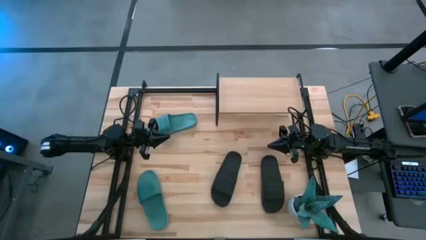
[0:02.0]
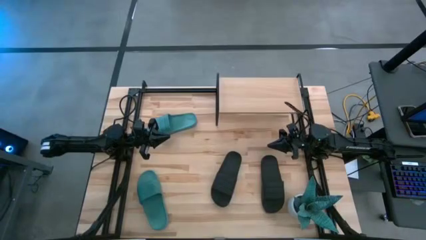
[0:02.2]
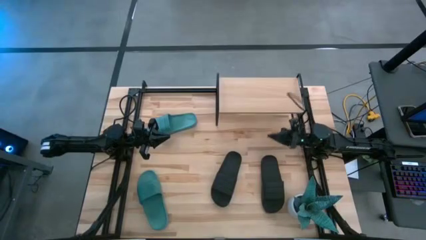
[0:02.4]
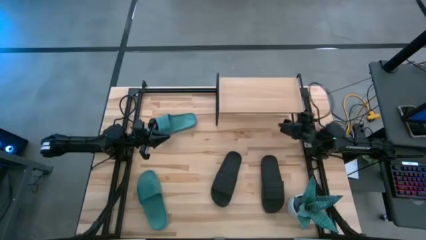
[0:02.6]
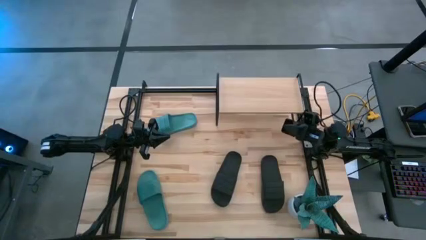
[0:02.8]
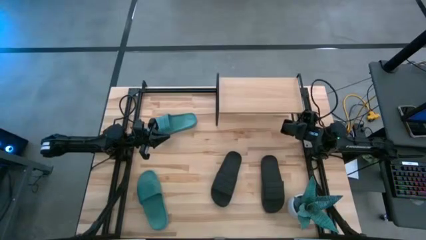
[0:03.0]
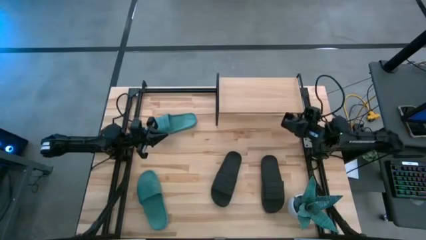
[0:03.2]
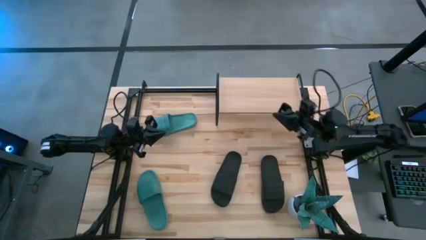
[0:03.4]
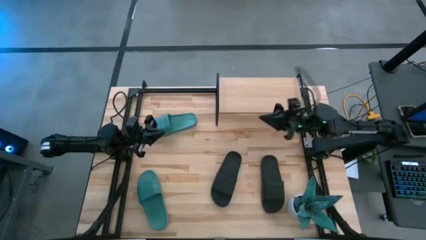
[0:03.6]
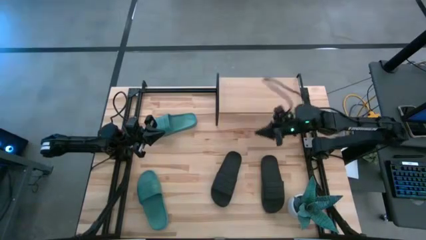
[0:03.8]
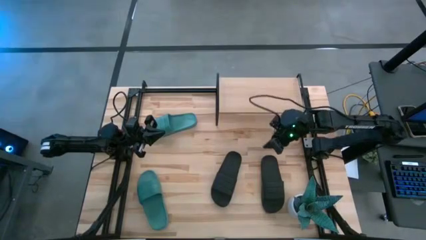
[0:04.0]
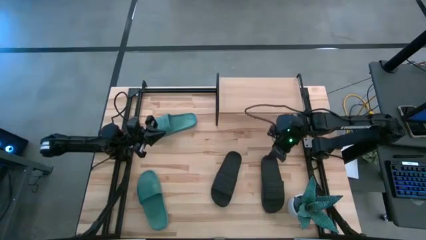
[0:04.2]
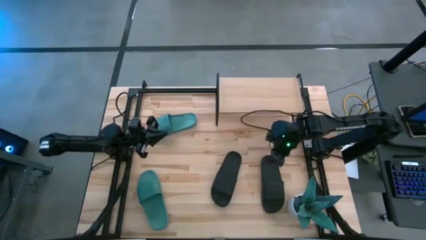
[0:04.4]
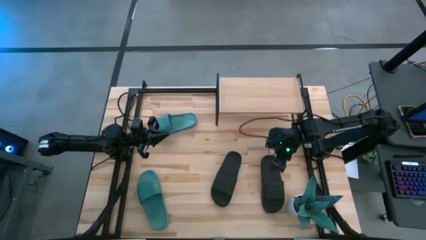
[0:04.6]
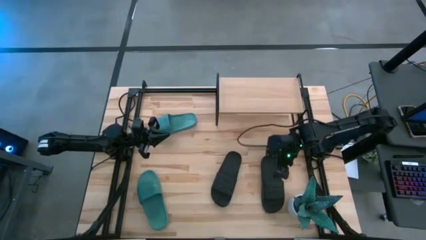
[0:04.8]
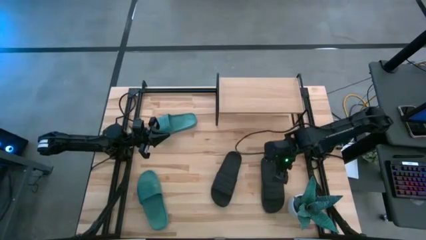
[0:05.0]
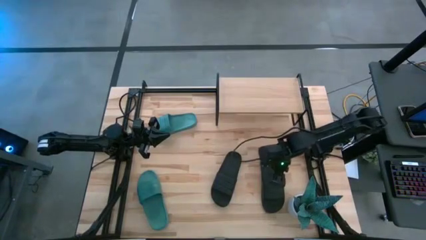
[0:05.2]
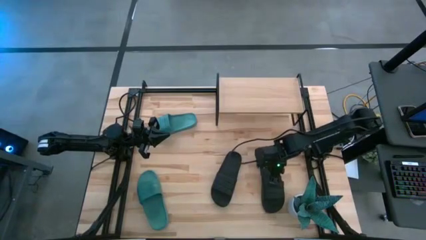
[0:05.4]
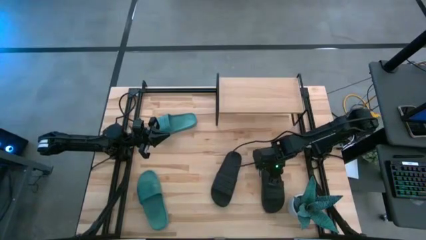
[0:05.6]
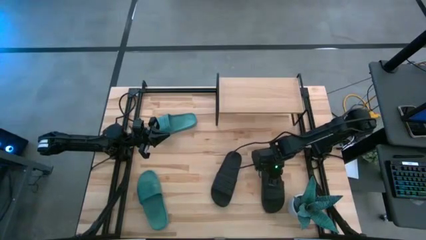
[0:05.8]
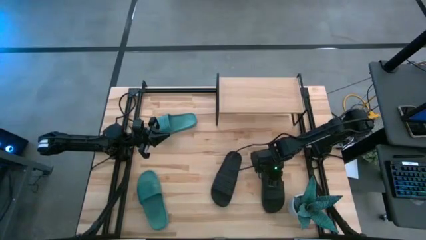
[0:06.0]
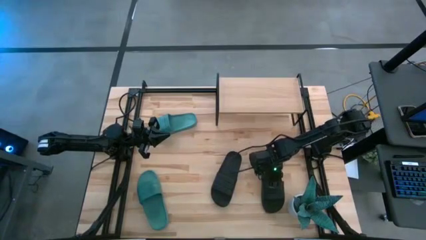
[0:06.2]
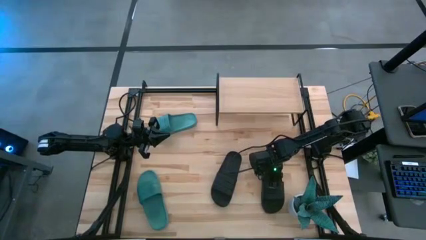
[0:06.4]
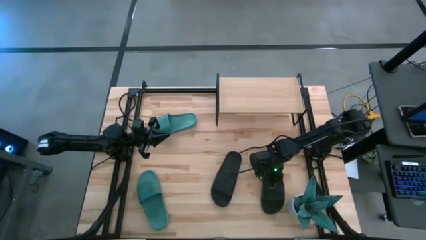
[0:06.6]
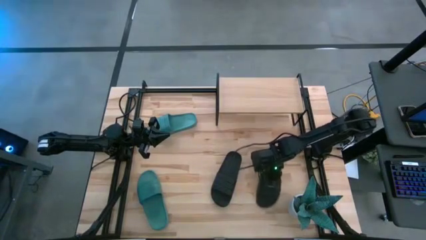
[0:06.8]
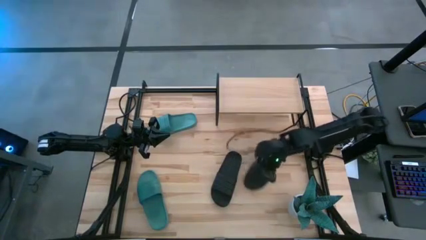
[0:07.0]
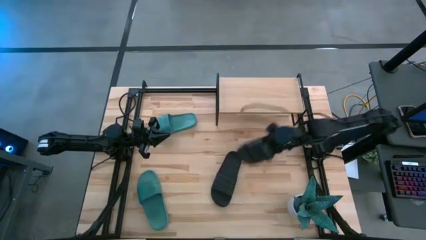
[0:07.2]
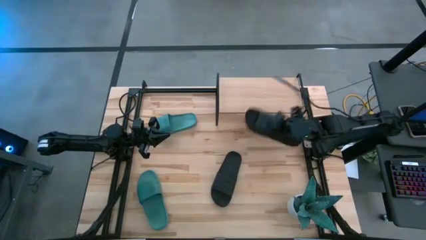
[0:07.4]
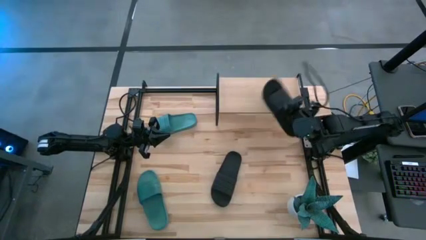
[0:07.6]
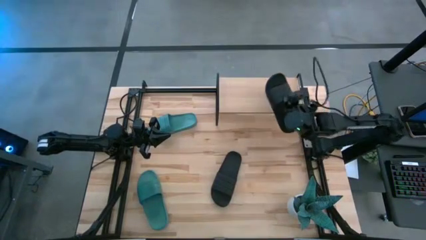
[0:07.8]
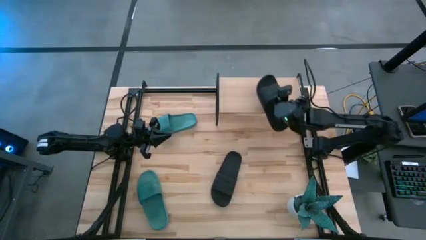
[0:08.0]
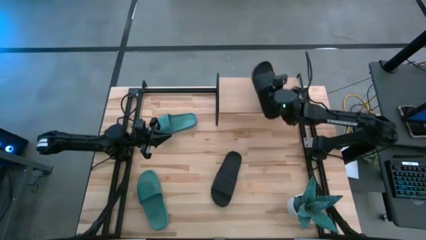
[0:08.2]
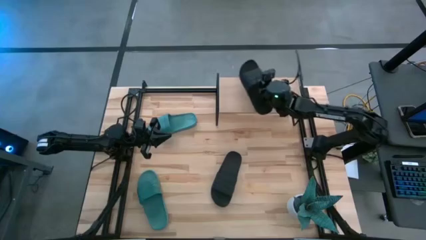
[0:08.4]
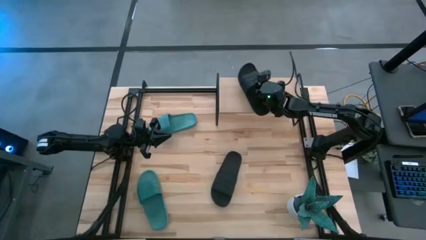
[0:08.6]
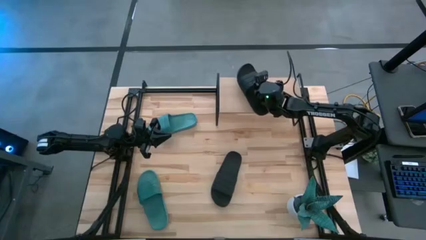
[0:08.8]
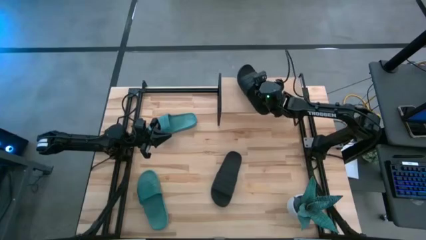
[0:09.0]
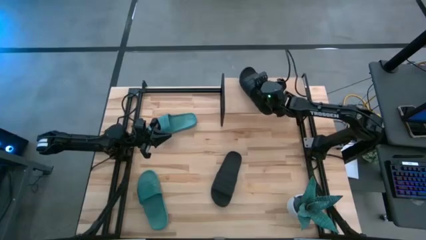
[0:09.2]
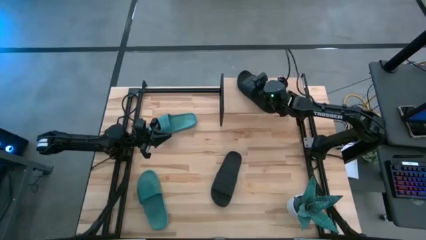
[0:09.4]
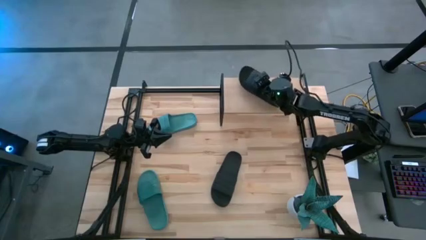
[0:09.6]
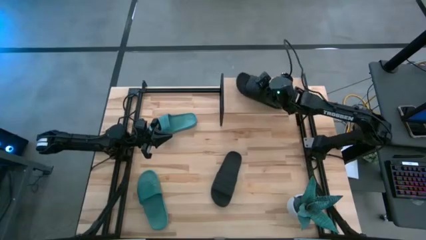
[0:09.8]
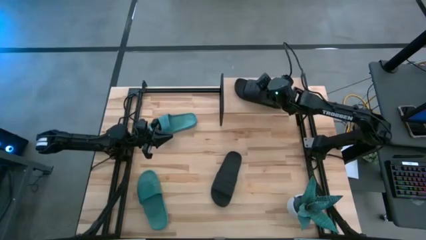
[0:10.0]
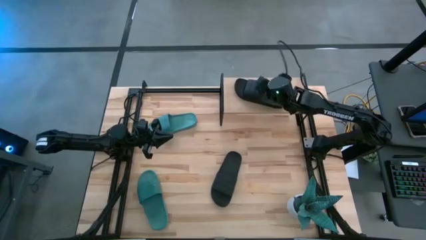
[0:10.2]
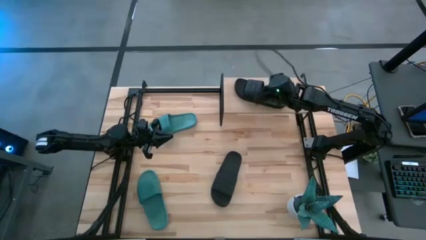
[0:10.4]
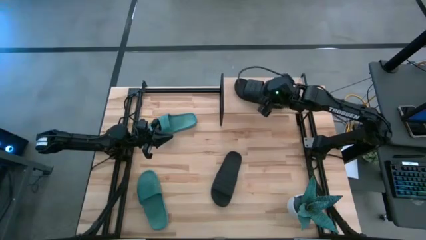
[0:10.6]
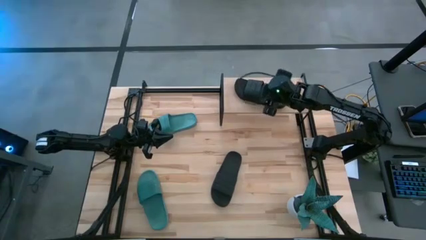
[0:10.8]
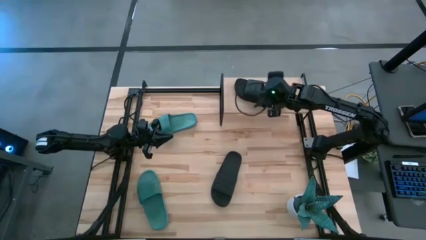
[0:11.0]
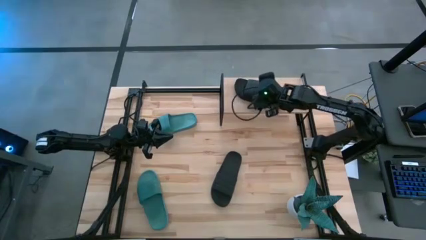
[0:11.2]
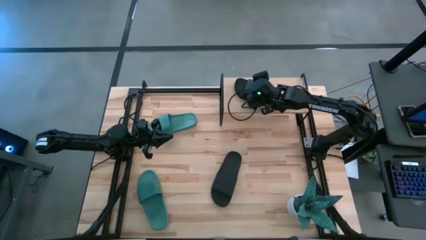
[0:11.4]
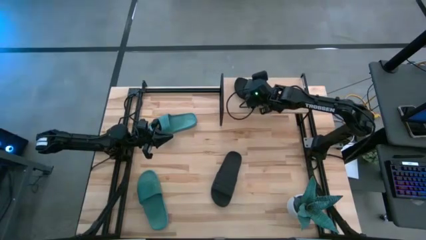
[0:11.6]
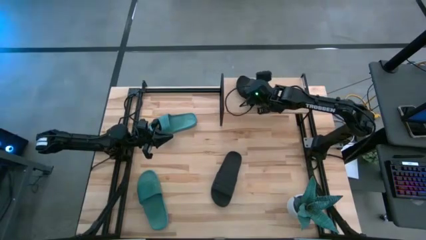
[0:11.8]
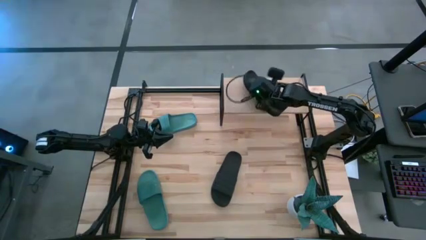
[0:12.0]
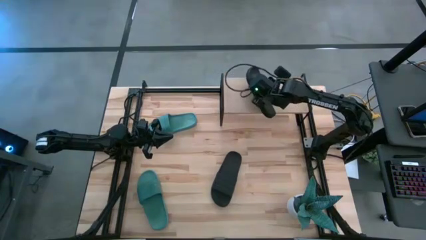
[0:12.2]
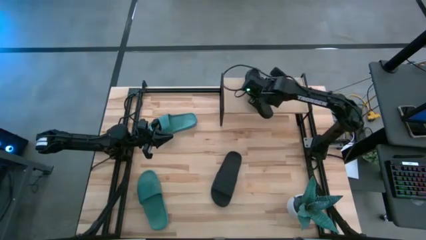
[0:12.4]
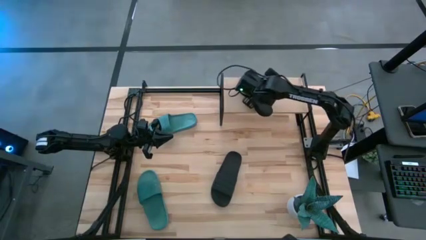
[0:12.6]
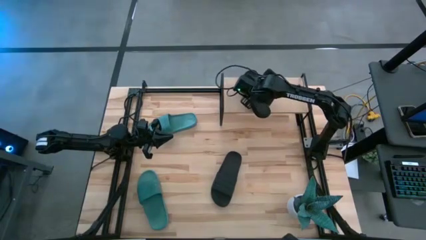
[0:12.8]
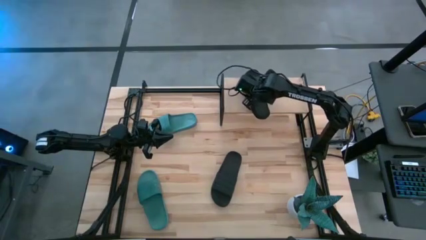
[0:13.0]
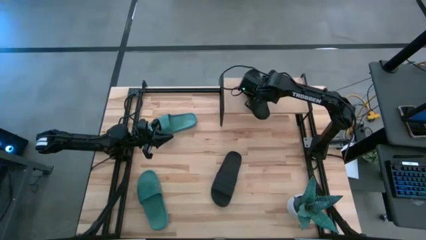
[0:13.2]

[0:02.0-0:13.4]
Task: Pick and place slides into the shelf
Put the right black slipper on the shelf
